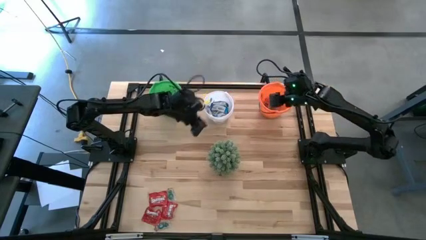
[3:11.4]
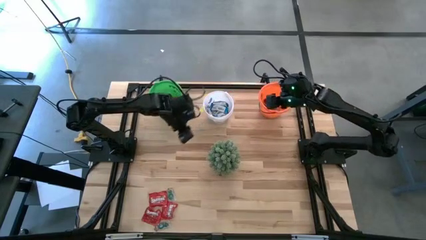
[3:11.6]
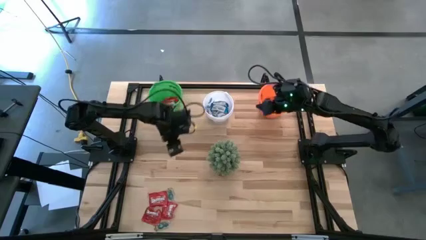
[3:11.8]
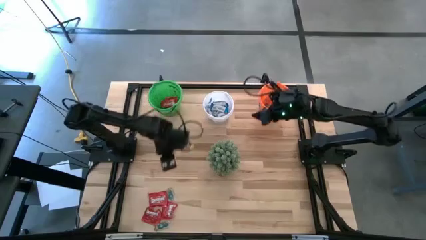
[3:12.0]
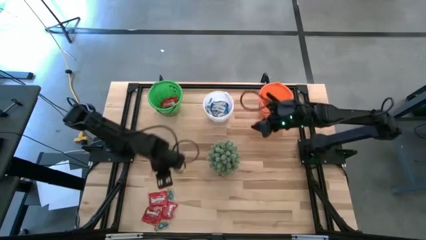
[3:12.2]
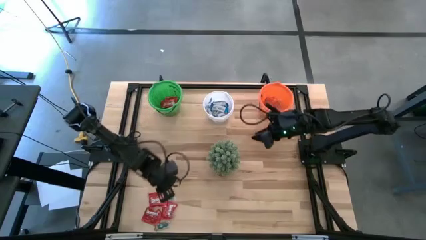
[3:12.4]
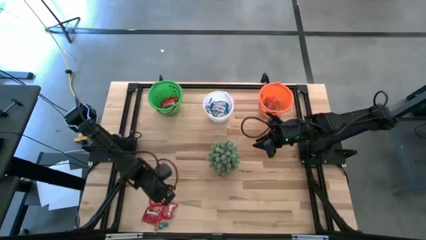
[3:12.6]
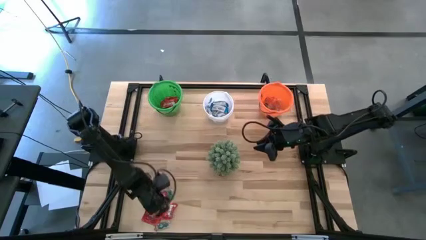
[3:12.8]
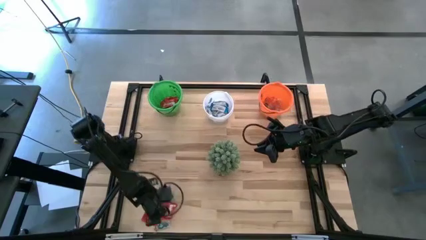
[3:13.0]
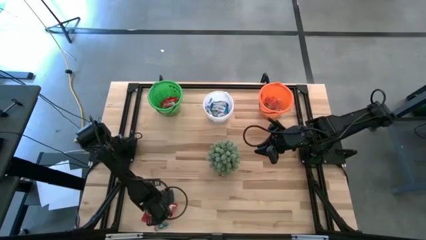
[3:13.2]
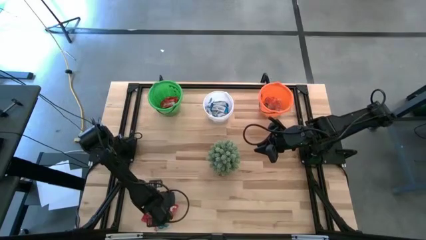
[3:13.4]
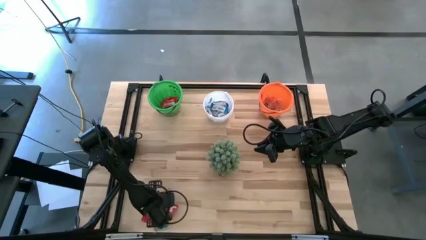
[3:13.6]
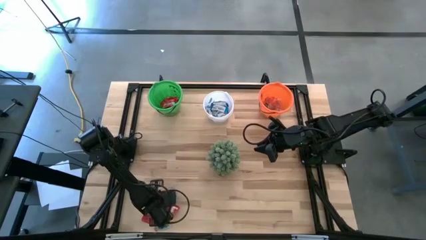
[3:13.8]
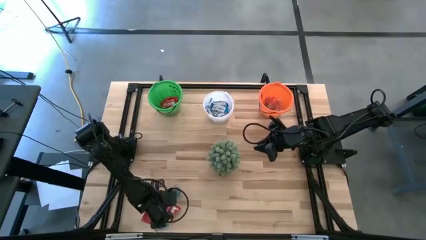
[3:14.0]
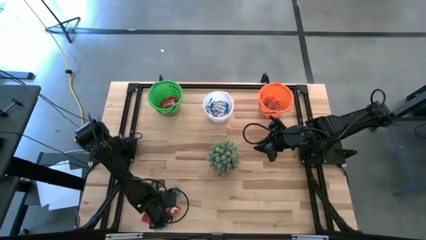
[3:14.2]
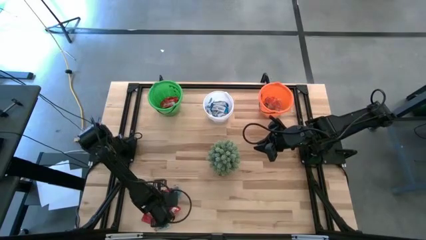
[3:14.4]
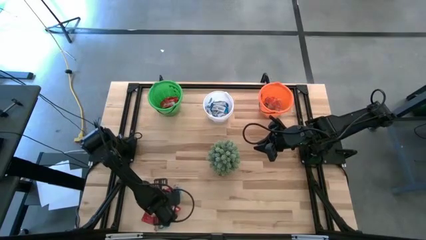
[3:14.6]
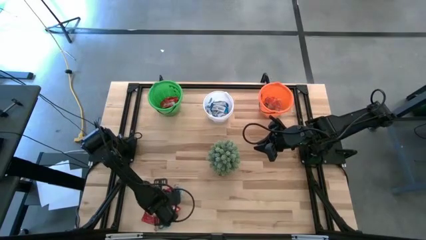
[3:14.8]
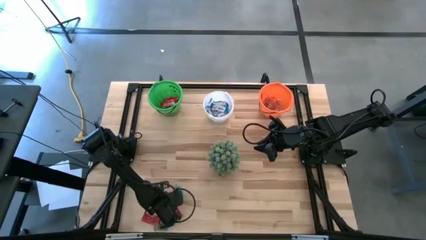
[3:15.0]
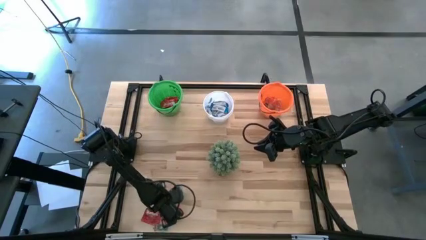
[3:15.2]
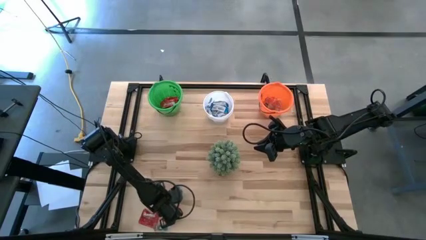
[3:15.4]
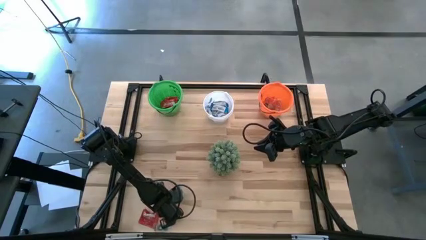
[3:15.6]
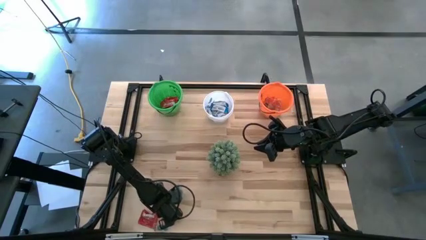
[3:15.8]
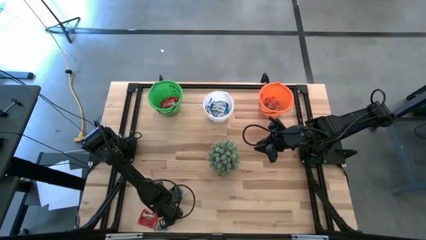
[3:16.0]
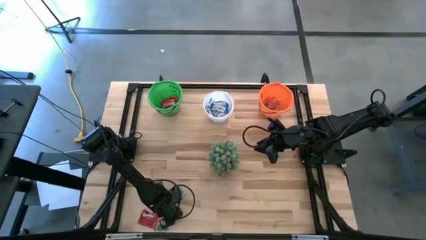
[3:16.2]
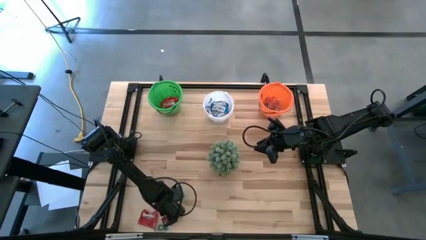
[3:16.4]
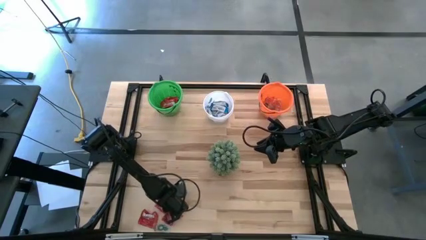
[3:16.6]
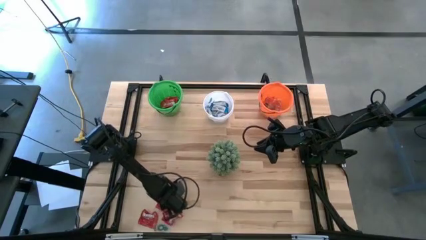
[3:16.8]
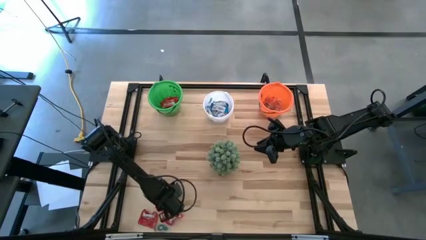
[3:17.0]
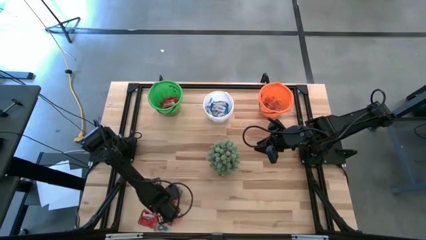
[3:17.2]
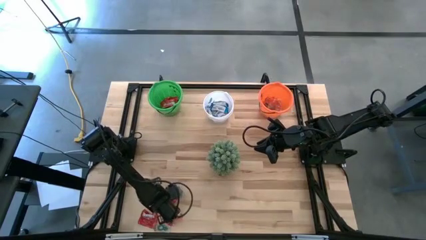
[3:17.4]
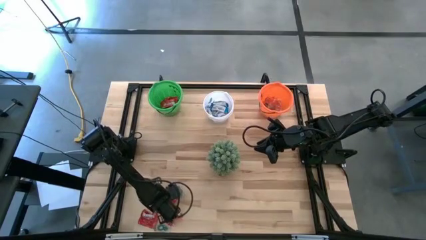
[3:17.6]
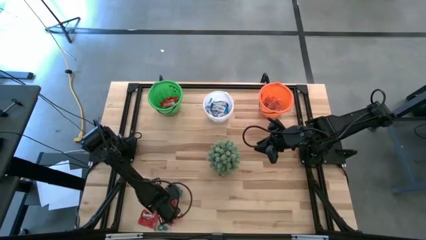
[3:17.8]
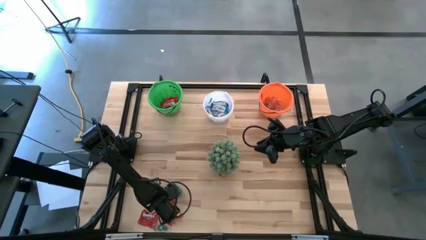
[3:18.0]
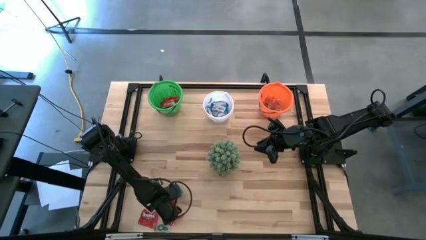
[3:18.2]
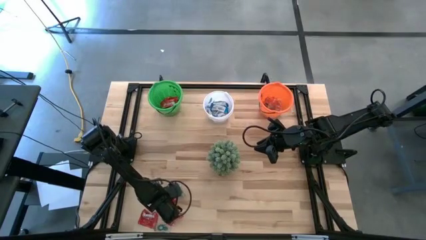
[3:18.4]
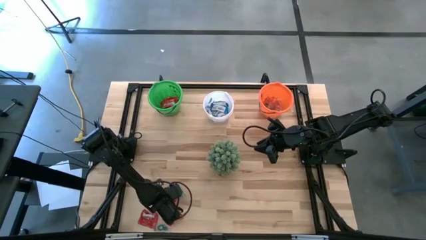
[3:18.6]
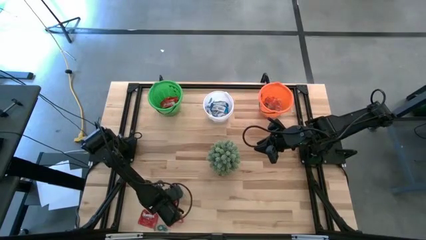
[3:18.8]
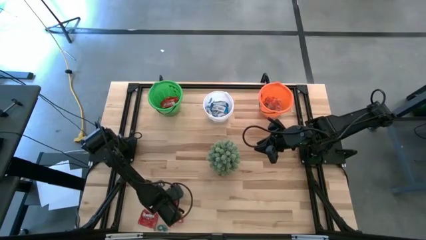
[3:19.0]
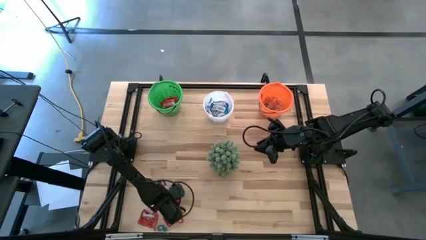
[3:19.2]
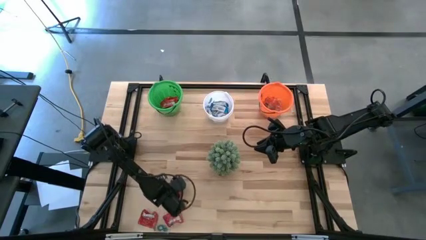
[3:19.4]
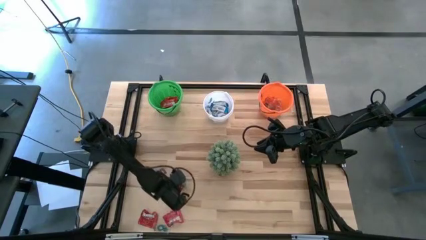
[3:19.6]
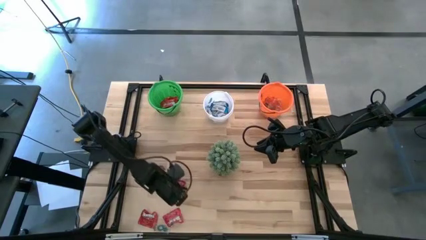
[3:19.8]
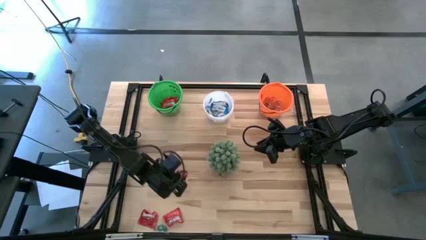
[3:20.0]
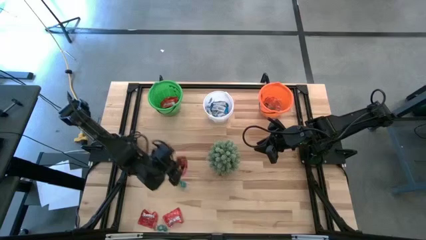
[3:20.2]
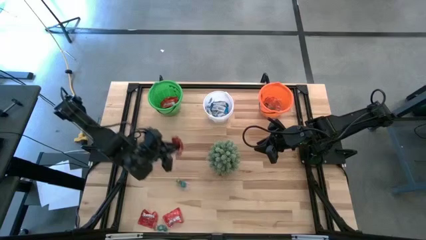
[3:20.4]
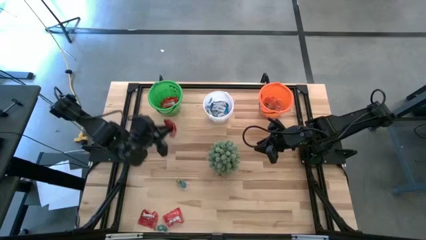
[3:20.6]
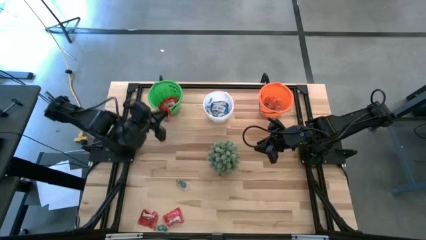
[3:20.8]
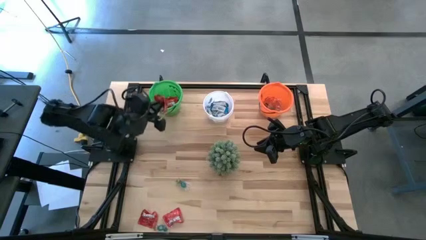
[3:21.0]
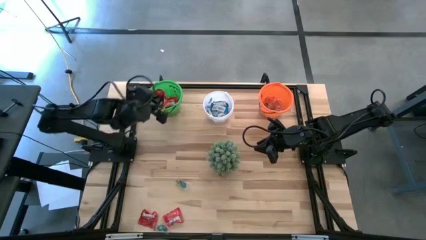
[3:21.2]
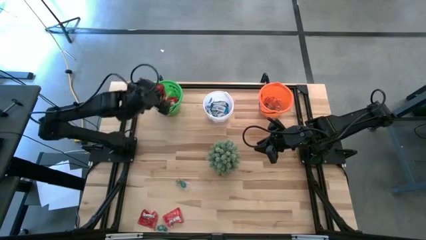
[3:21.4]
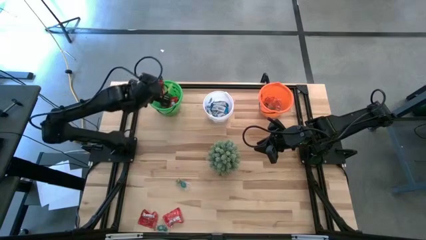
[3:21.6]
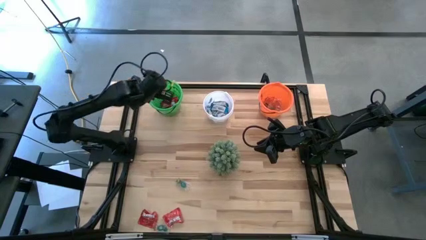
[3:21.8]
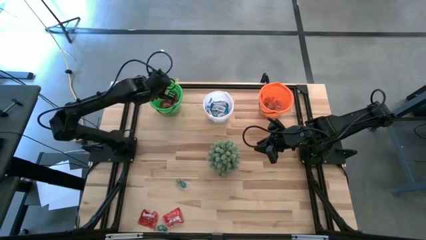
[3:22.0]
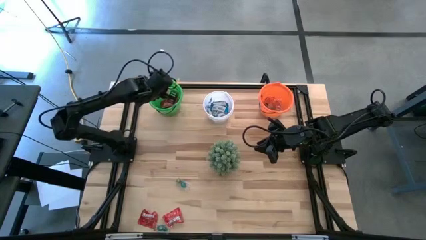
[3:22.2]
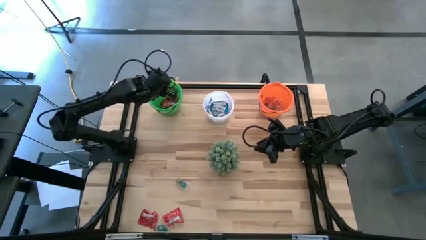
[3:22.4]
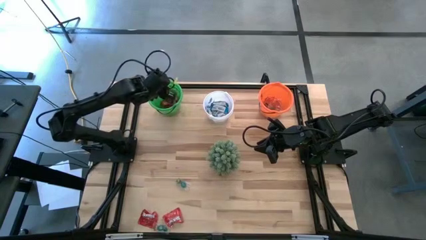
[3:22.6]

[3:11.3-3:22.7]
Task: Sort candy
Put the red candy into the green bucket

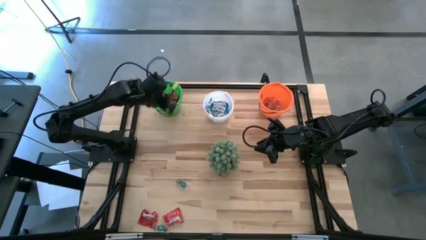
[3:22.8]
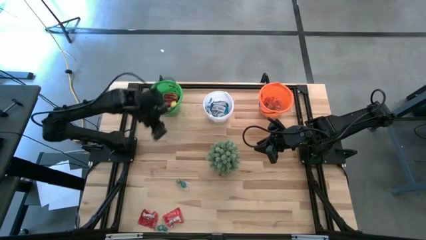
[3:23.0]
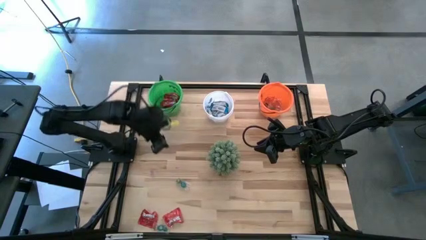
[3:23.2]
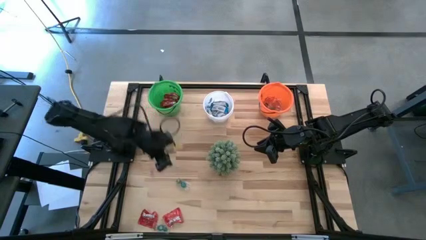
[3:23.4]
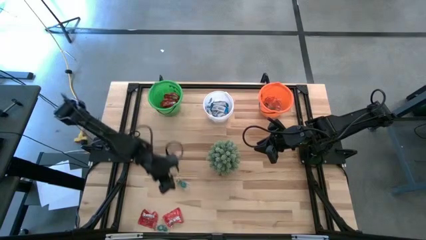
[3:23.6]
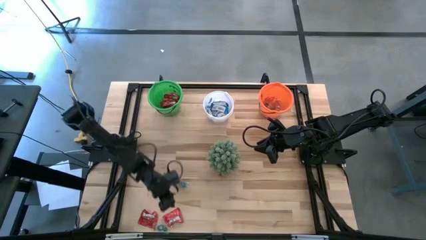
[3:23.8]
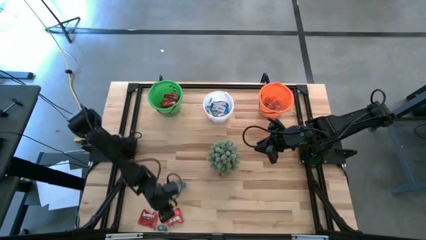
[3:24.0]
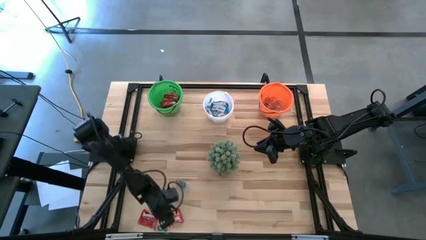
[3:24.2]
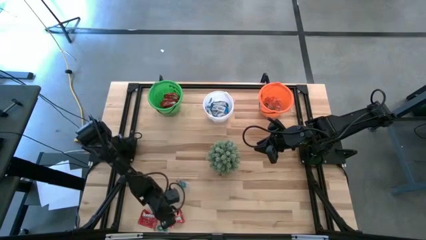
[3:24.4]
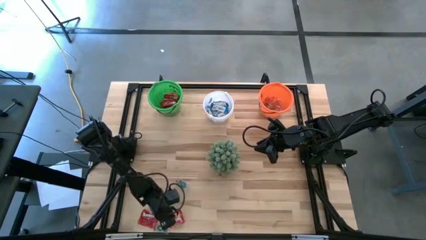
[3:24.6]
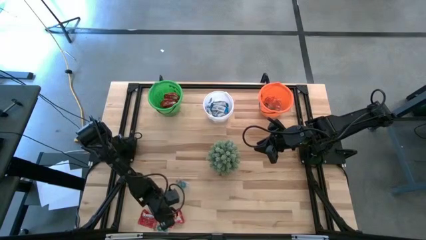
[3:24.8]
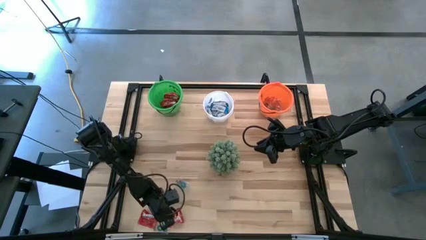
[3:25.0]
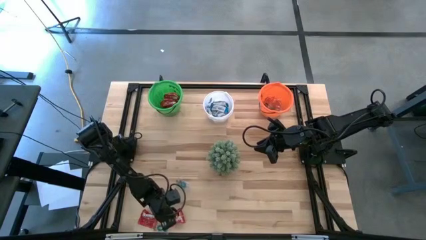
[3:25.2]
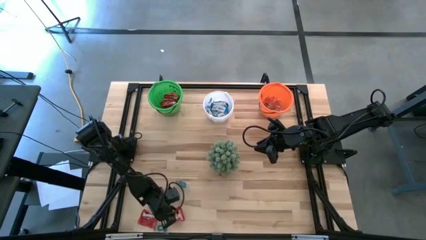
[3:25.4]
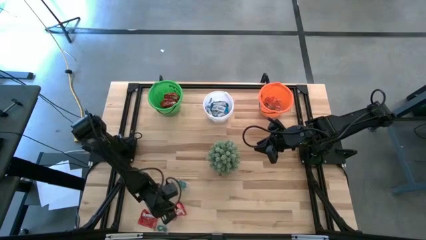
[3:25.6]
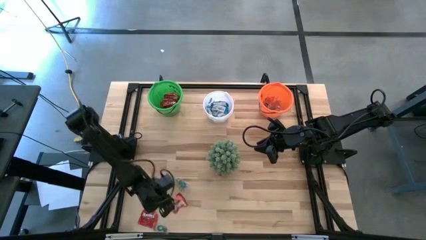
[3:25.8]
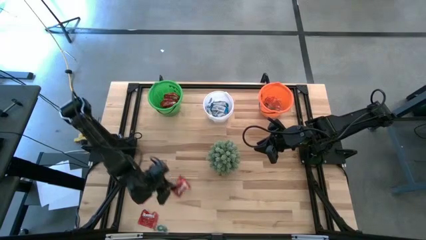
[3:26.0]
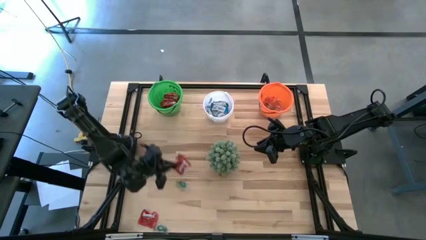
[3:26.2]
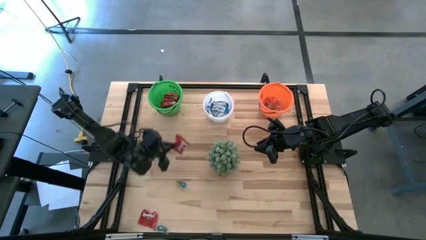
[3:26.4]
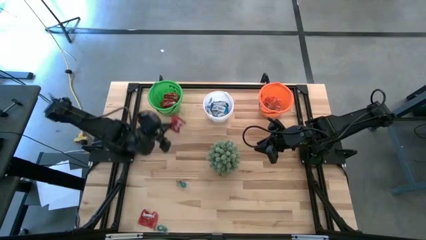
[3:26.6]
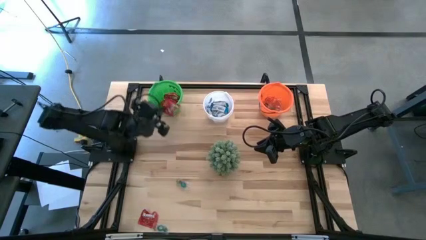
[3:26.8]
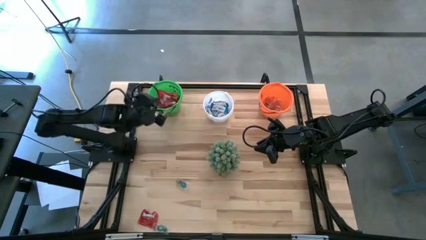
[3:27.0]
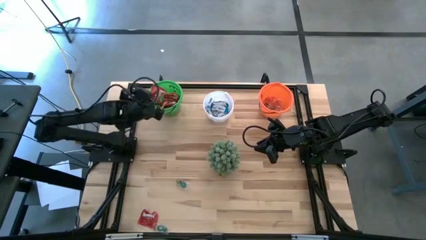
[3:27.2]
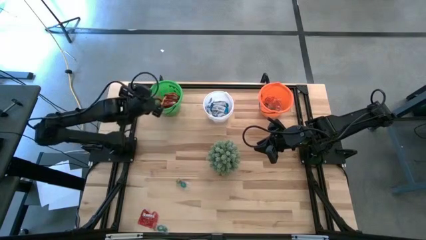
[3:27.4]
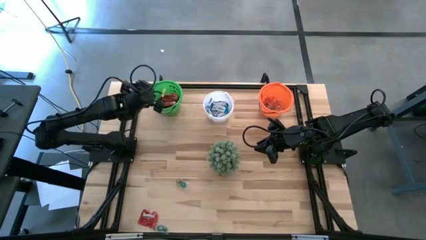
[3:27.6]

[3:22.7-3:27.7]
Put the red candy into the green bucket
